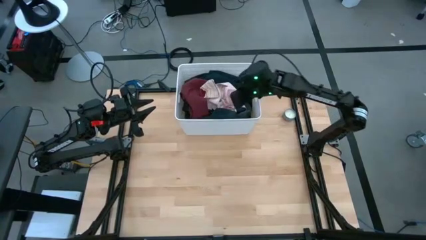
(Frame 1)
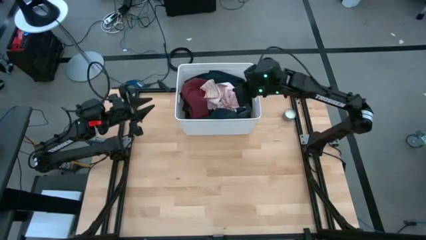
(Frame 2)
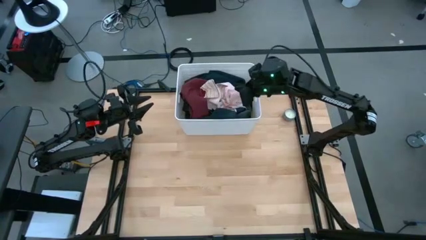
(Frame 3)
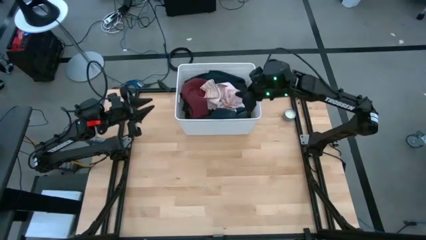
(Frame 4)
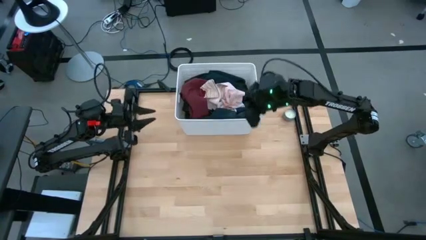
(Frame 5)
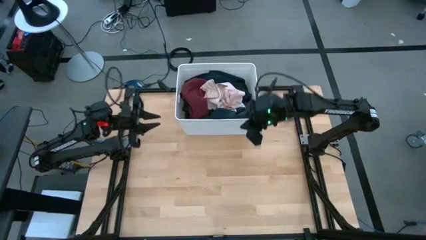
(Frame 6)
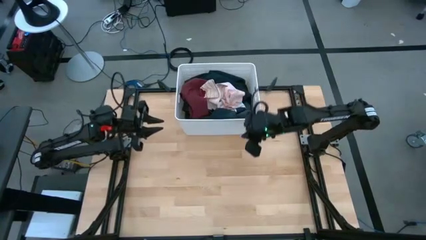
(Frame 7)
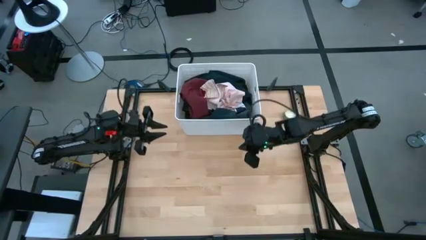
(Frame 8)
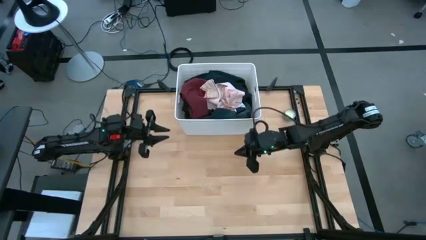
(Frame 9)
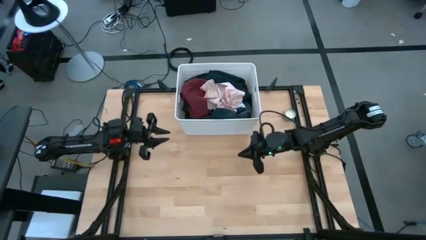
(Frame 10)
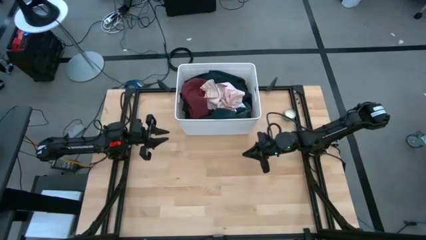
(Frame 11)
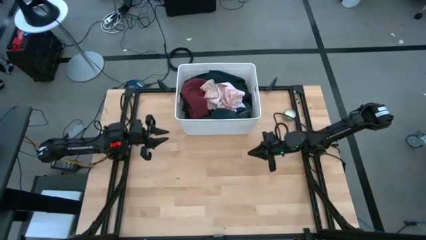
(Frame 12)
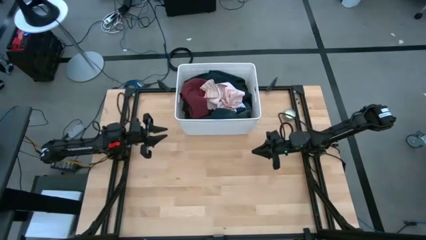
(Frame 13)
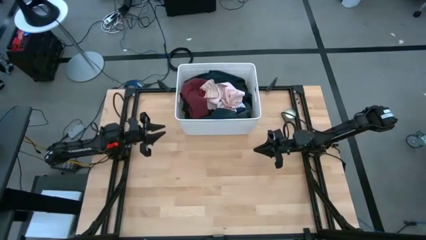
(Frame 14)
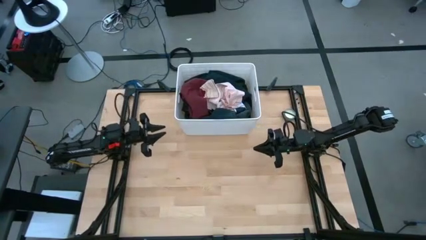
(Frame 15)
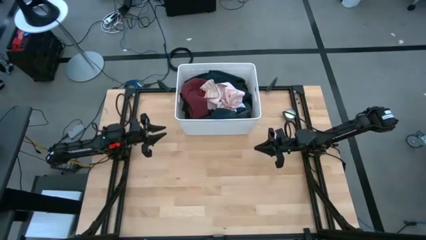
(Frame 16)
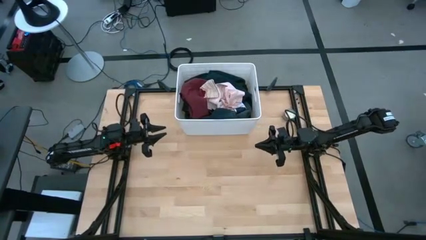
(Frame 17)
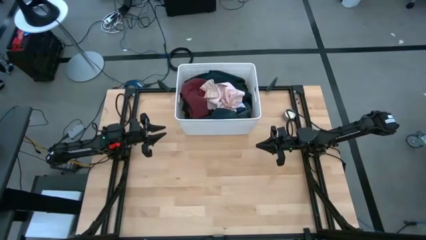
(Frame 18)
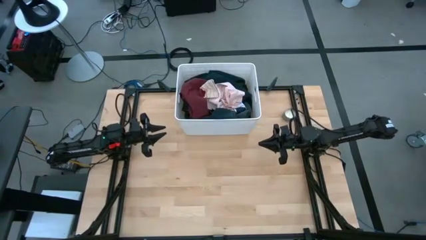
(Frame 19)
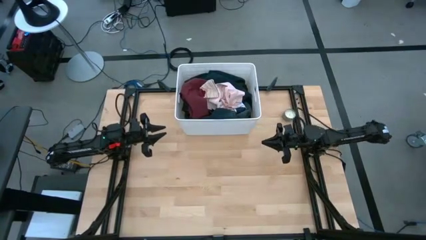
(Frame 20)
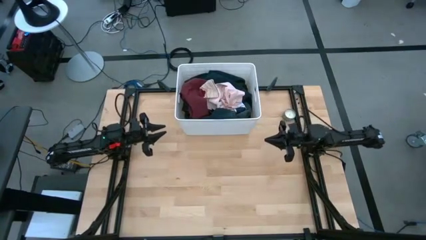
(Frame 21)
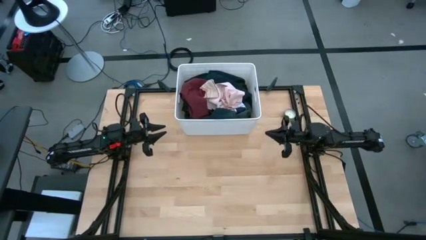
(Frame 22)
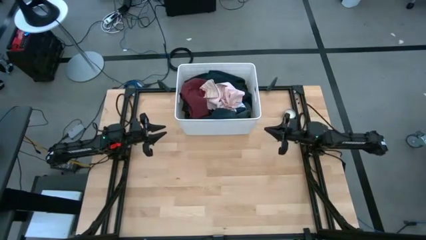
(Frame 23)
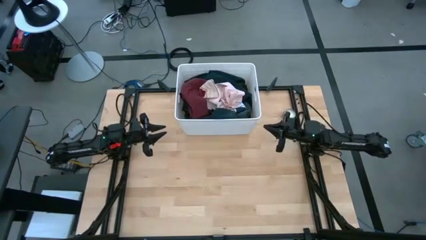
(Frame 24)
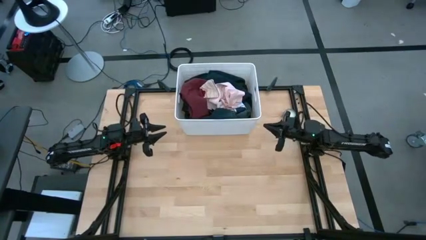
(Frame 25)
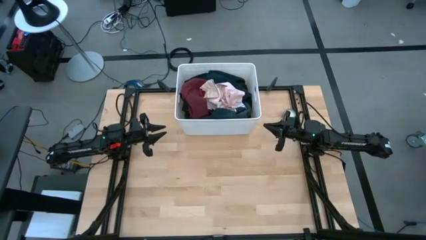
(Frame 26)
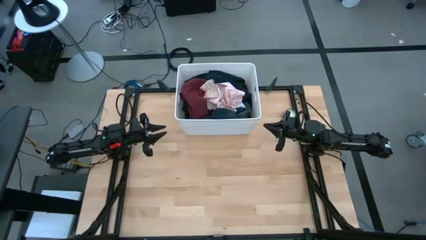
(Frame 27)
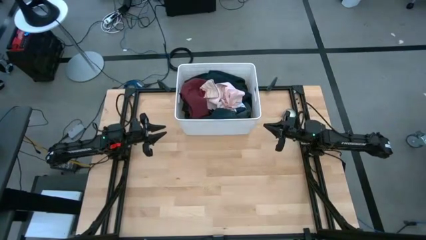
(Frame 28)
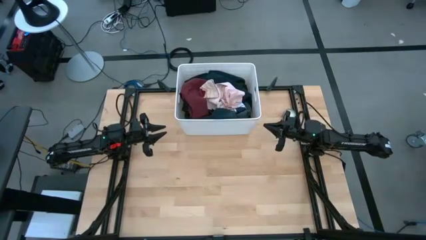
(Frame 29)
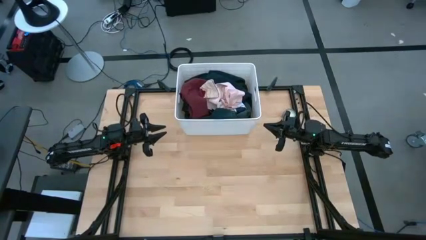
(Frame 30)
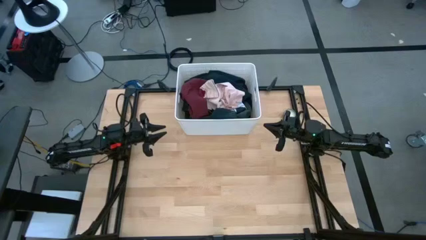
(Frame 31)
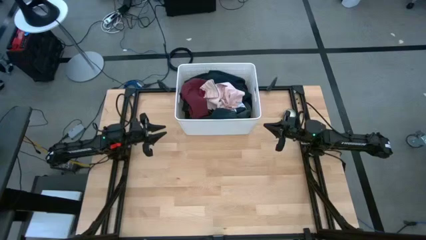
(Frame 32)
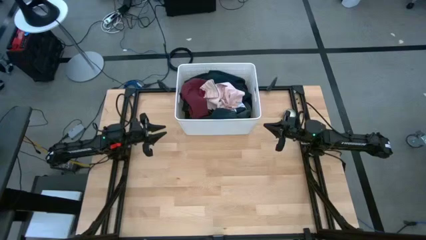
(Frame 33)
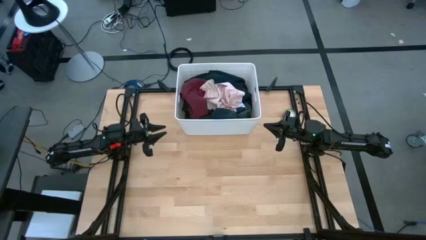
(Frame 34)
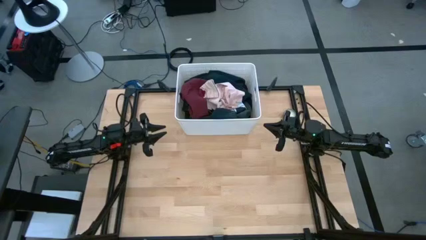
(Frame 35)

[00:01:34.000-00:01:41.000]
Task: Sort clothes
Return to Home Position

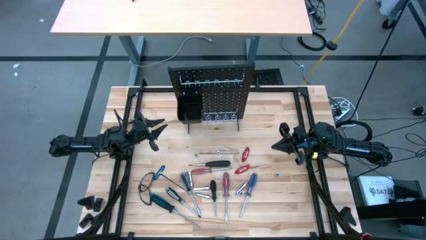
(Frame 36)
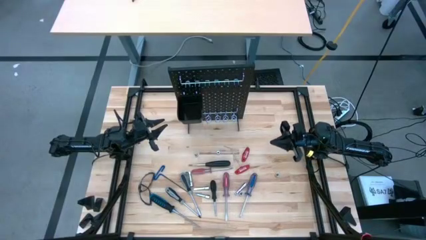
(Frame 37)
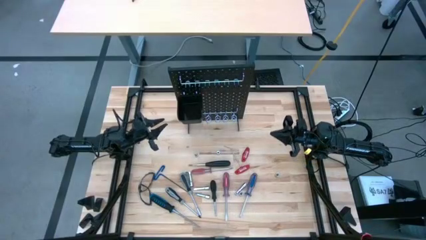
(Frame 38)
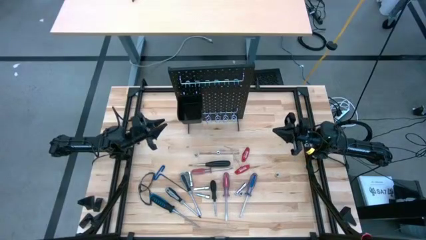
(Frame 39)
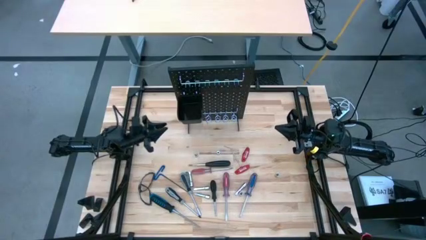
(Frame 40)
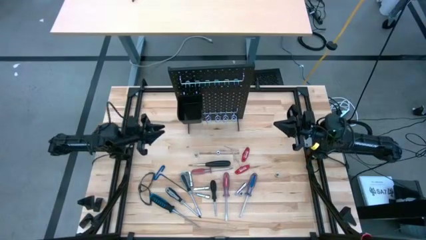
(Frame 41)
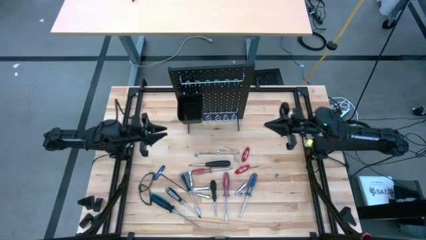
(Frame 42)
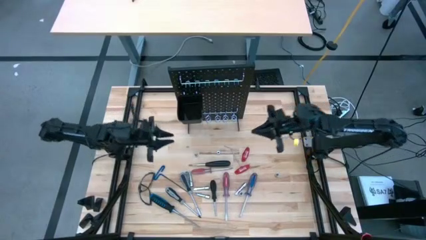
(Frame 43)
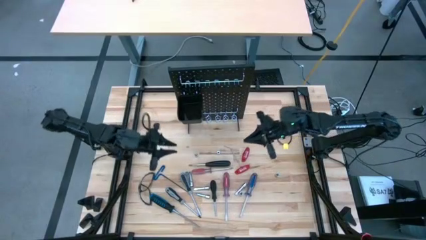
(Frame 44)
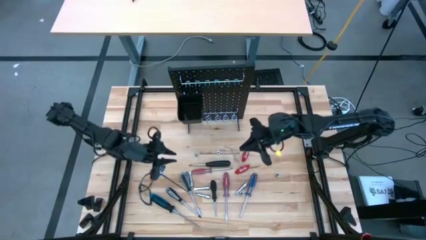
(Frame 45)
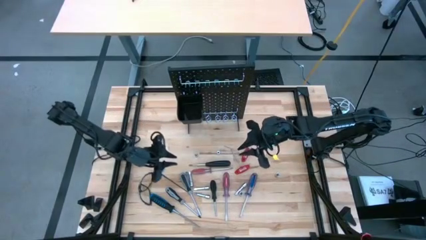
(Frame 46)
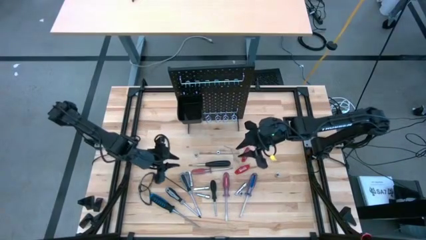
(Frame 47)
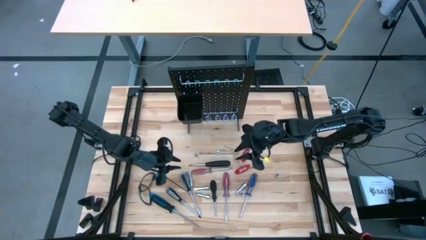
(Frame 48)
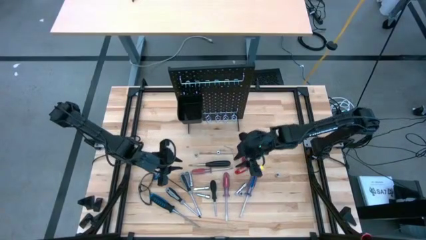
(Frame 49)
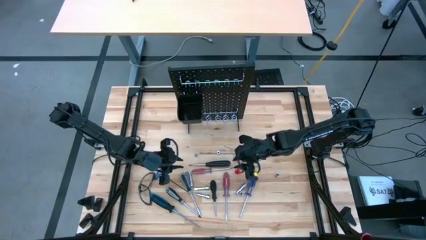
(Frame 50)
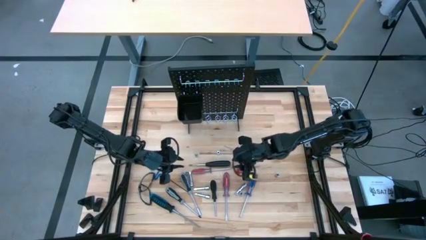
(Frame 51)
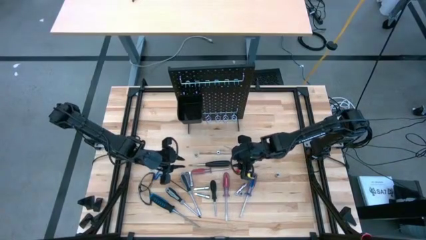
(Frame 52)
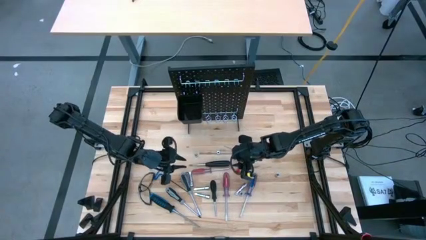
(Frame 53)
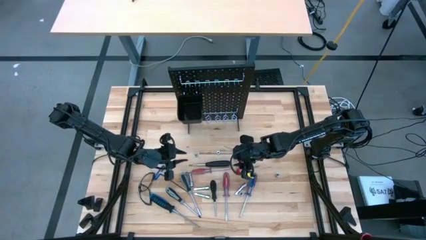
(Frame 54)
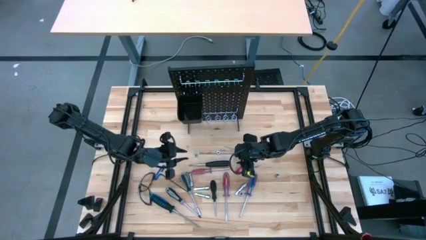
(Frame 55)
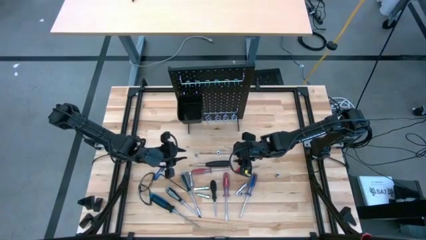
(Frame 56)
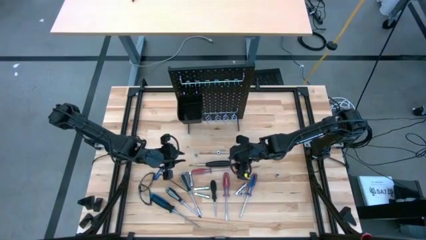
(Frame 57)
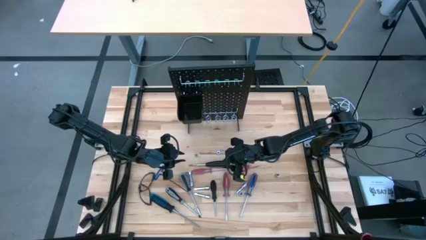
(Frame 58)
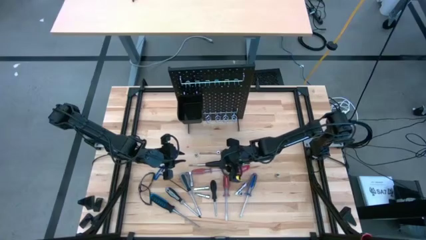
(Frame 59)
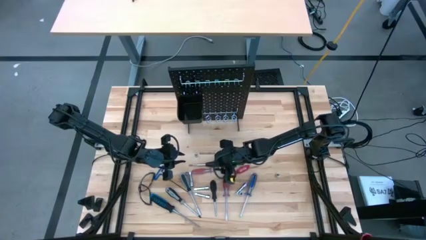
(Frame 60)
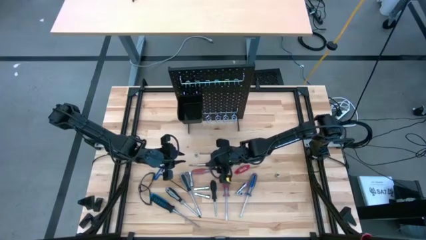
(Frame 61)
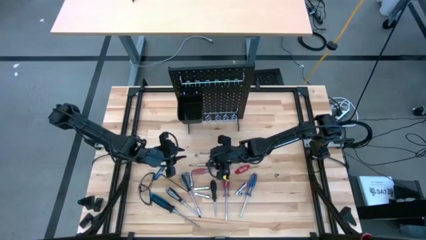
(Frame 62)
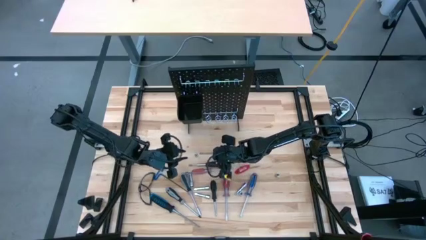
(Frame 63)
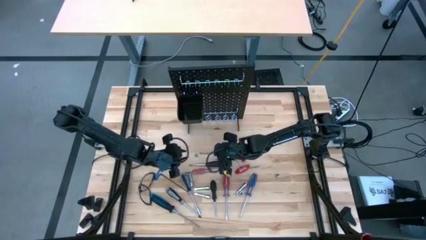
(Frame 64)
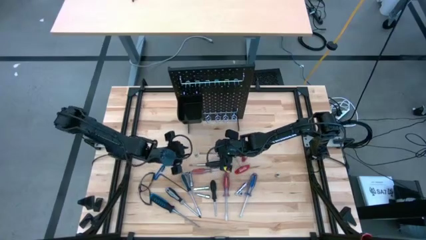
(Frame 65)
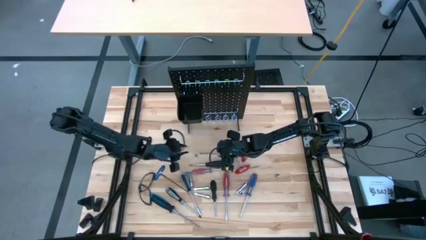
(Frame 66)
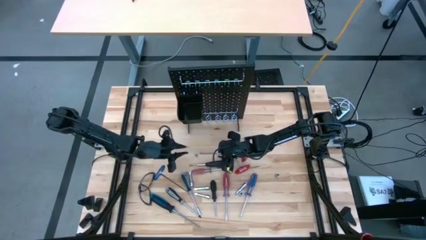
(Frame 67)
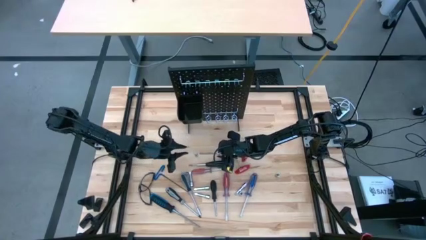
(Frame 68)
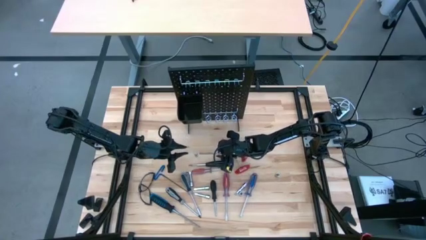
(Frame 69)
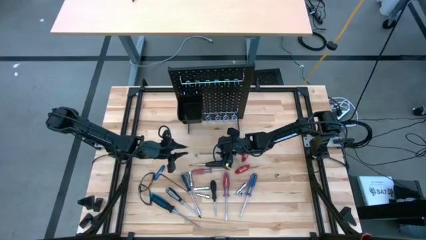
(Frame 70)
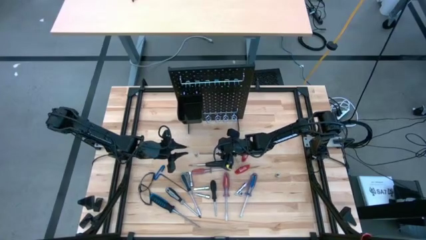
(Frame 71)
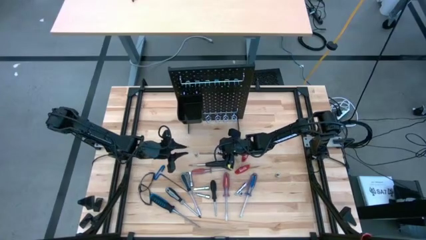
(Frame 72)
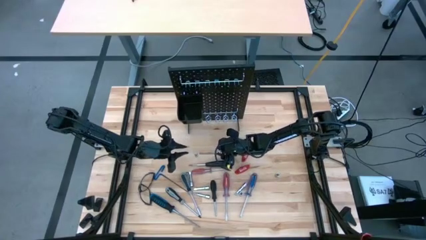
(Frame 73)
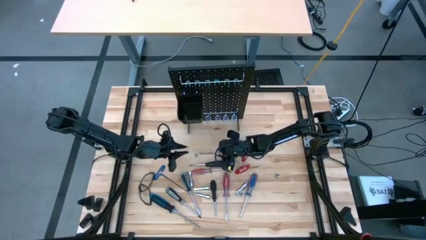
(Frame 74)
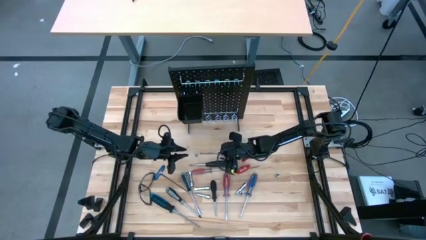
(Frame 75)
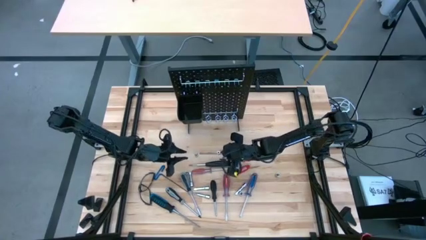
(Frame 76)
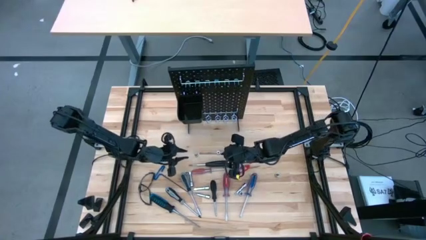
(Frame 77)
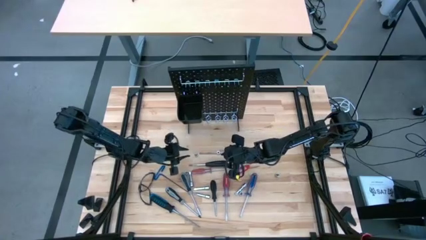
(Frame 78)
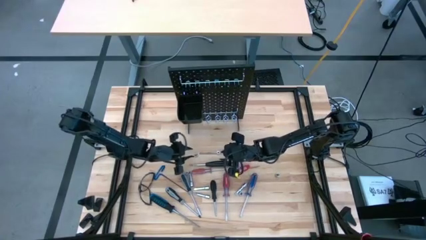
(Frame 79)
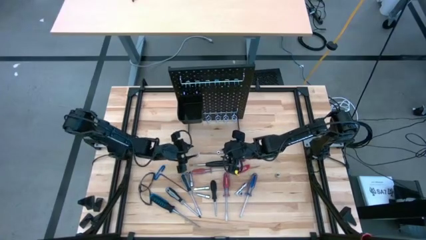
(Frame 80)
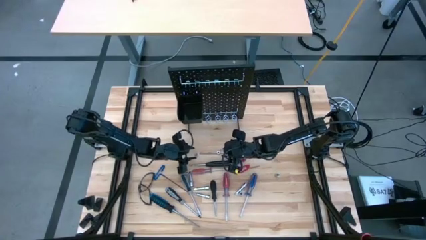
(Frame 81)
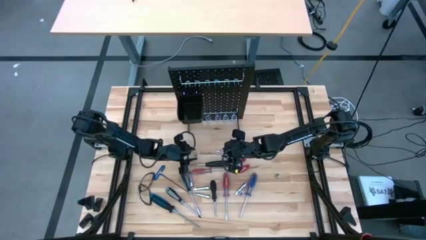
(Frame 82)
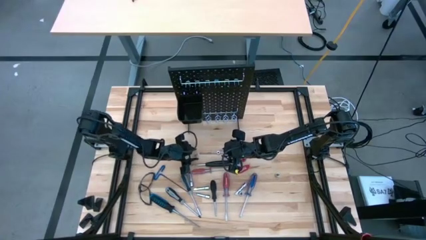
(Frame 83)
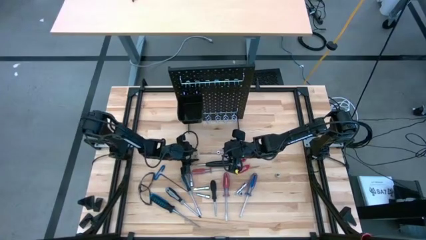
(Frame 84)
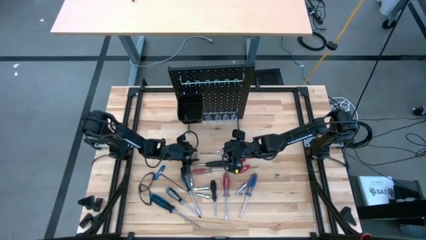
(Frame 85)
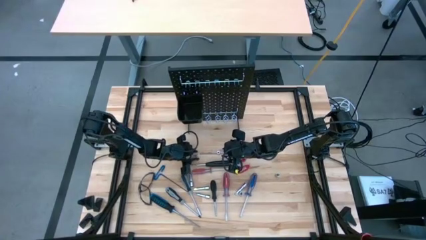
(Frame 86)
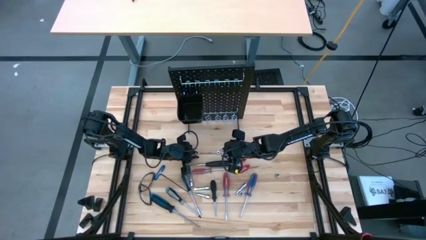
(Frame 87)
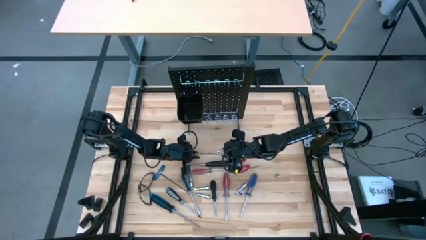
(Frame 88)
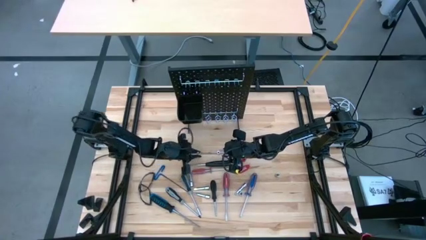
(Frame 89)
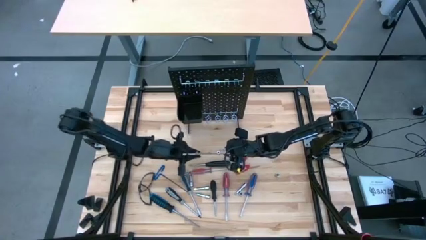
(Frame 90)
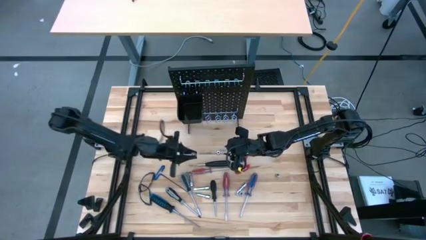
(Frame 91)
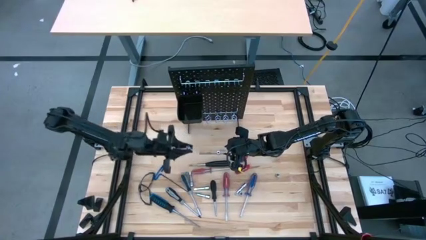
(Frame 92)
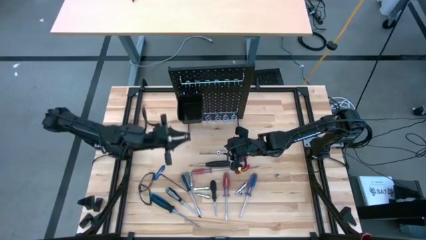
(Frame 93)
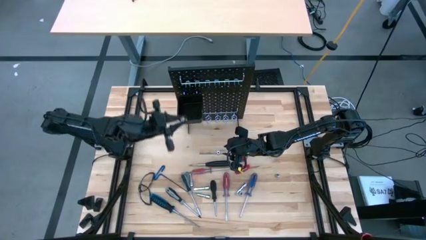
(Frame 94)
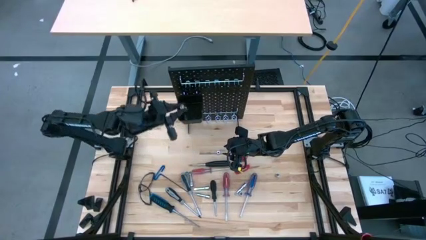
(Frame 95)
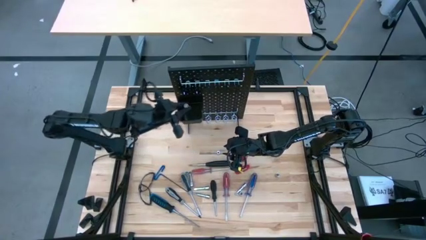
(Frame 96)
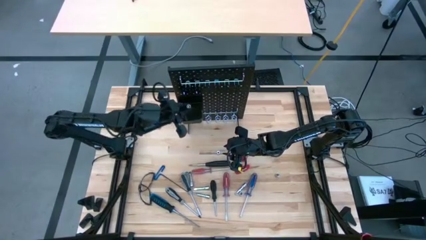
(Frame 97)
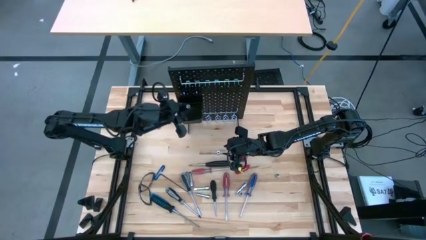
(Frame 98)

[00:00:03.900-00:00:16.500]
Task: Hang tools onto peg board
Put the socket into the black bin on the pegboard
